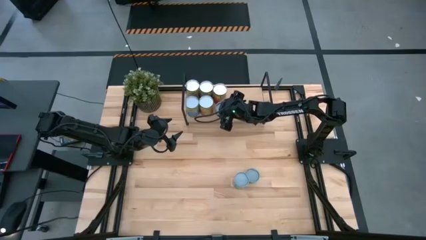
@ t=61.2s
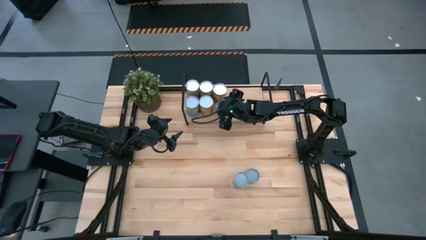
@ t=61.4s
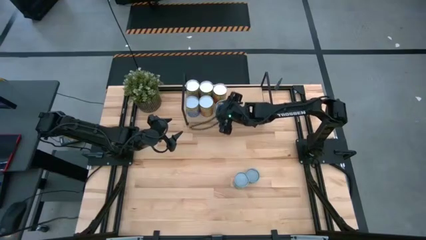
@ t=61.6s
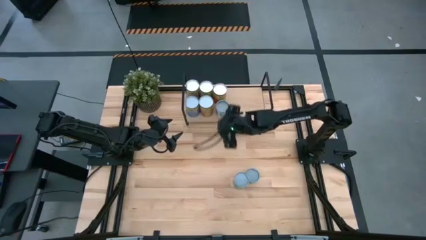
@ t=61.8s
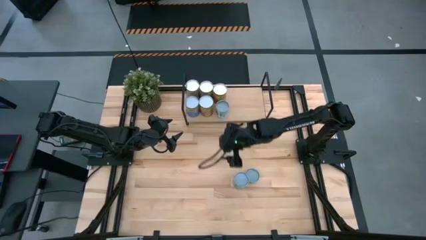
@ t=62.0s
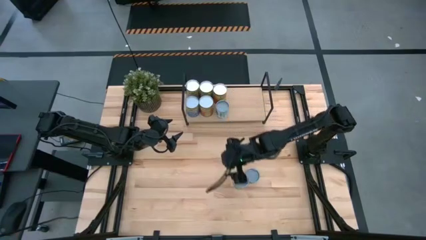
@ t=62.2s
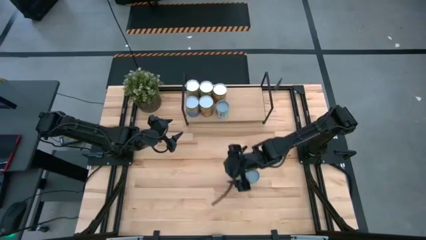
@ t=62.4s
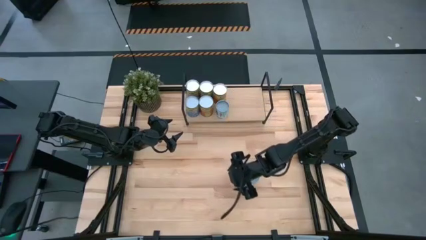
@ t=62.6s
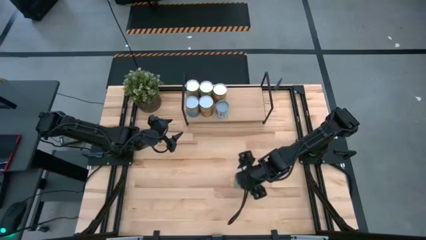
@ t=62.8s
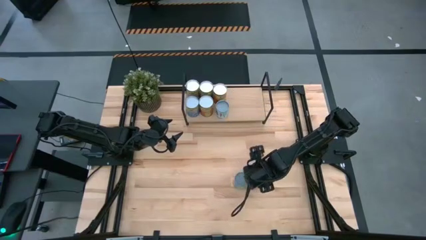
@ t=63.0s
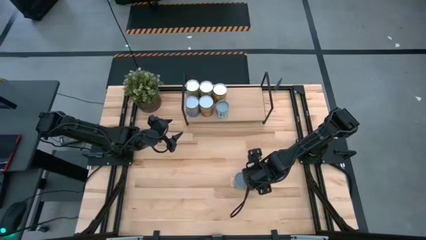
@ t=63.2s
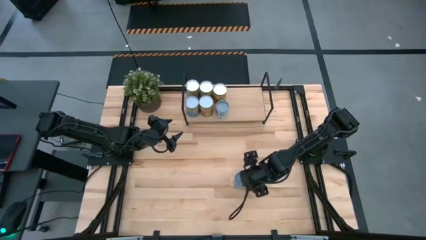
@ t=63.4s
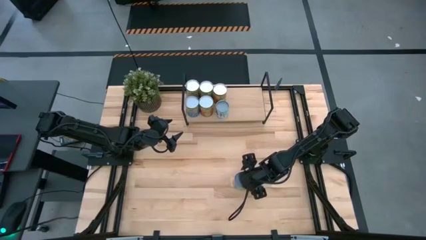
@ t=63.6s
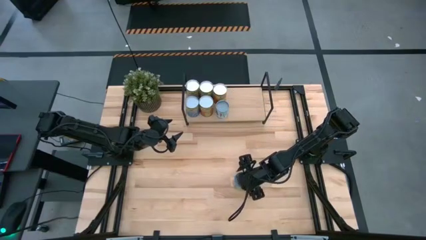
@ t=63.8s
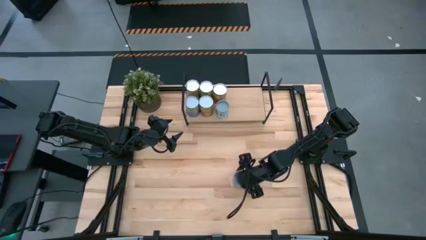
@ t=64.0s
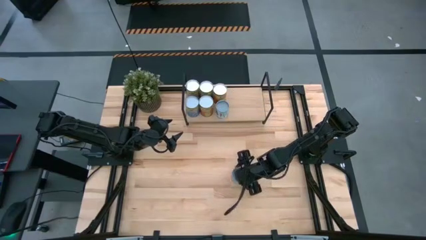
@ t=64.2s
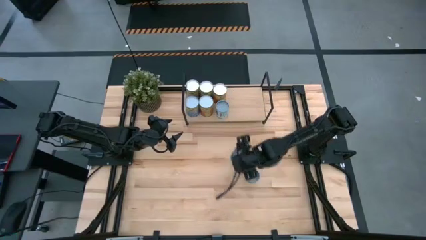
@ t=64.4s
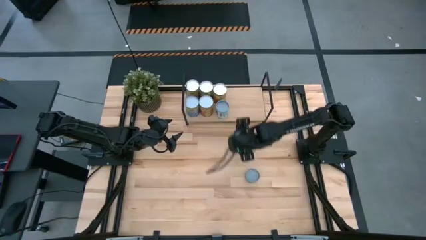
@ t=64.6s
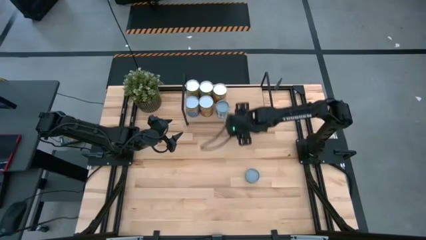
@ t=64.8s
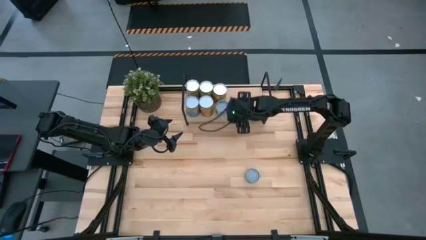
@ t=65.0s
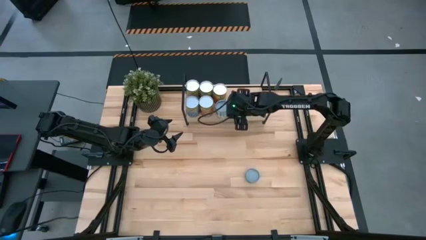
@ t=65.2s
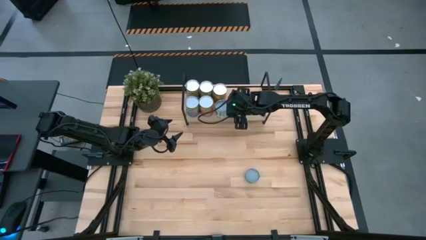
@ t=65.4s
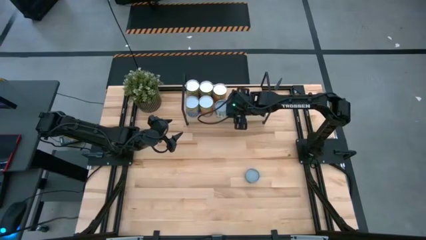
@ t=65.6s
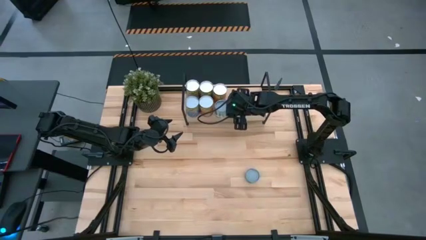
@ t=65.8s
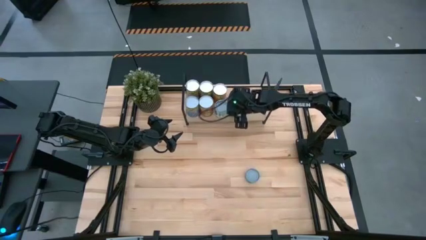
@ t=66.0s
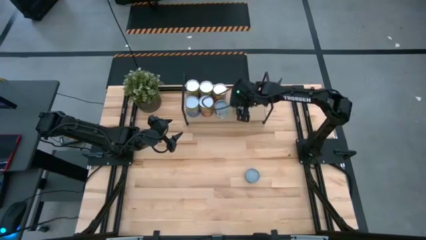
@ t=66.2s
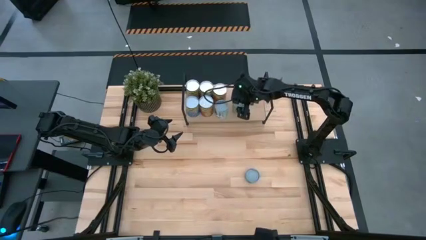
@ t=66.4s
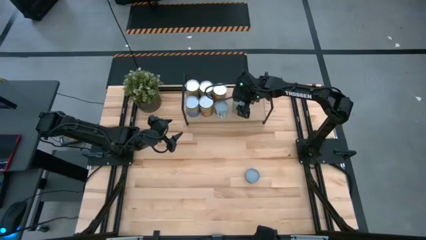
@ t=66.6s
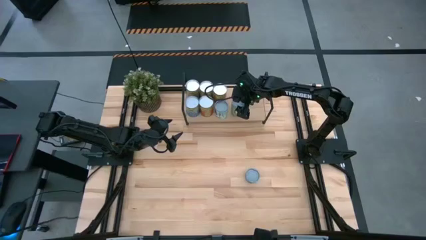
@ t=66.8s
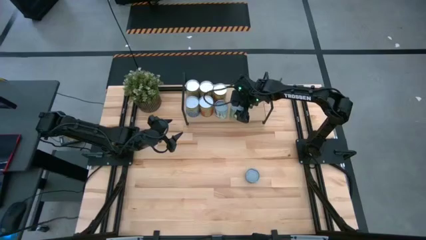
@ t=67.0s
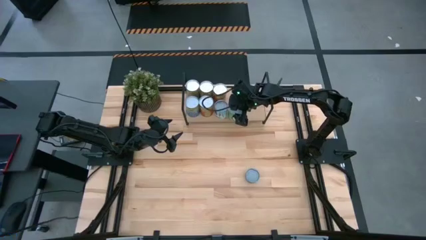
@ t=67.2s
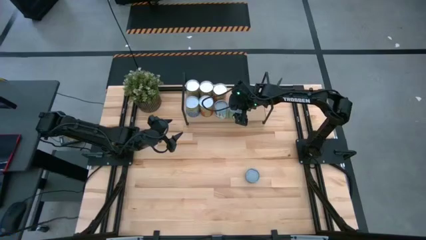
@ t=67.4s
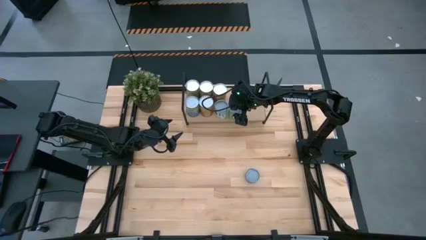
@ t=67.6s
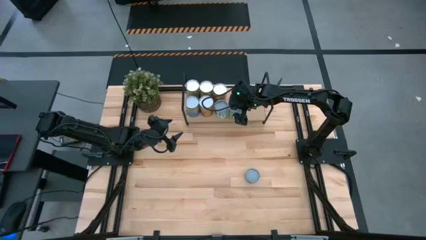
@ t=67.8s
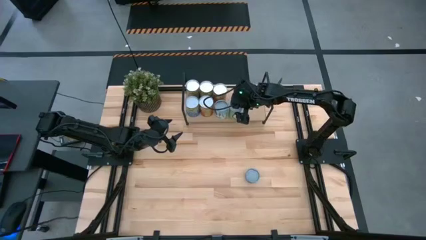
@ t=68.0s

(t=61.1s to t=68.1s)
Task: Pick and place cans onto a shelf
Put the light green can on the shelf

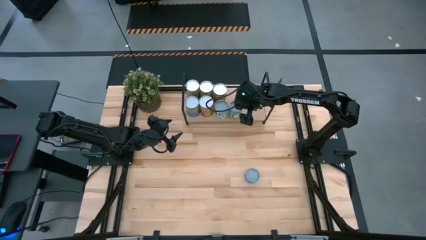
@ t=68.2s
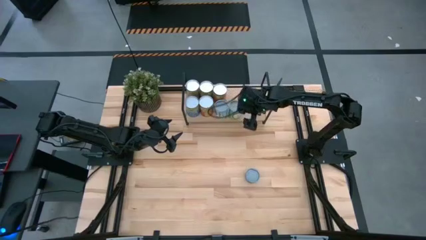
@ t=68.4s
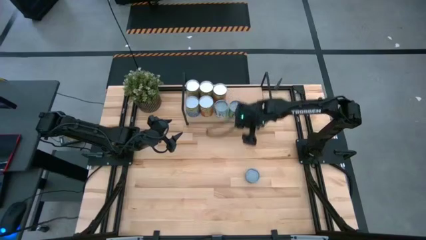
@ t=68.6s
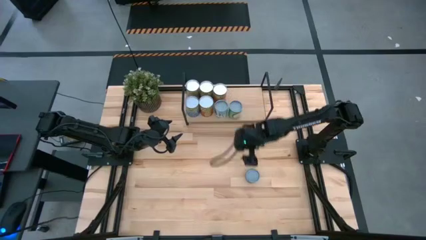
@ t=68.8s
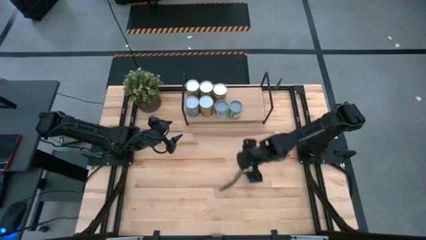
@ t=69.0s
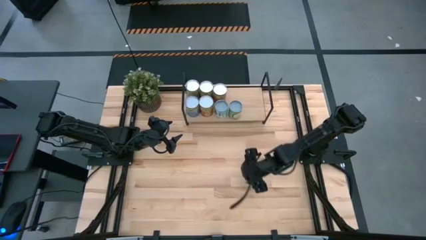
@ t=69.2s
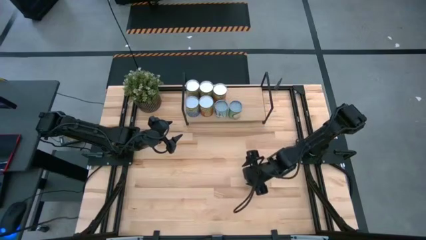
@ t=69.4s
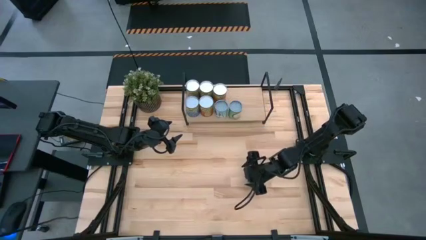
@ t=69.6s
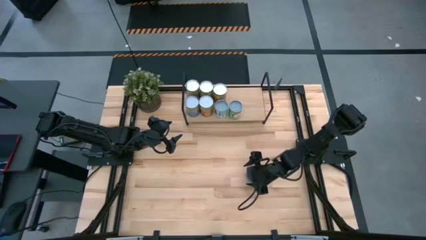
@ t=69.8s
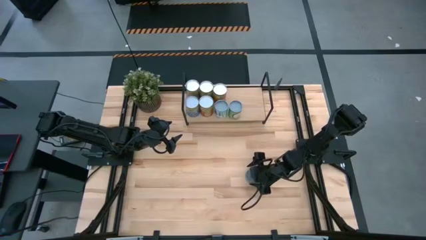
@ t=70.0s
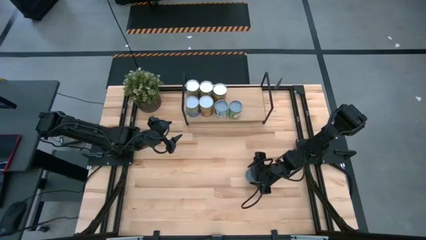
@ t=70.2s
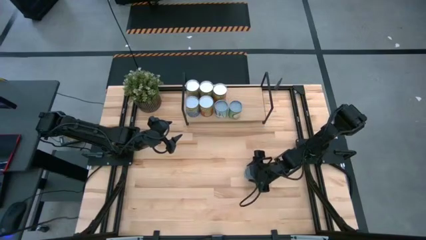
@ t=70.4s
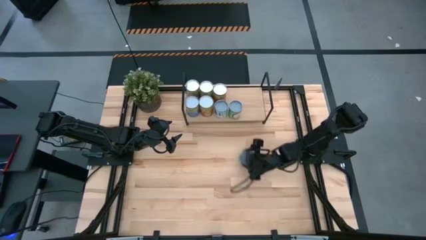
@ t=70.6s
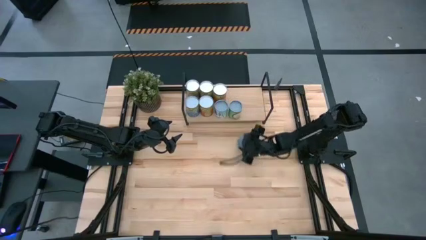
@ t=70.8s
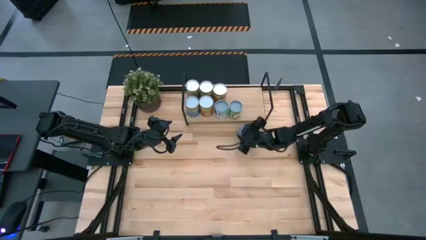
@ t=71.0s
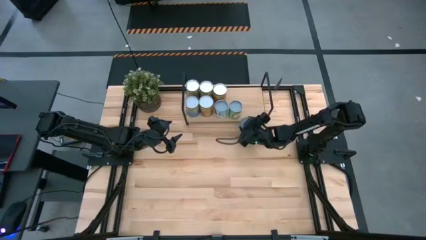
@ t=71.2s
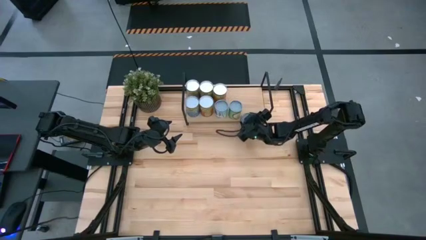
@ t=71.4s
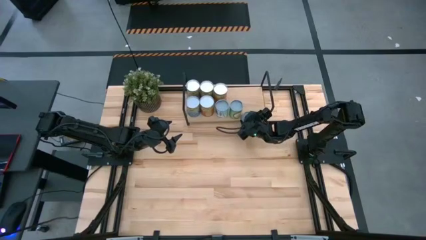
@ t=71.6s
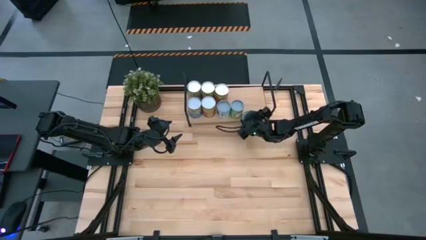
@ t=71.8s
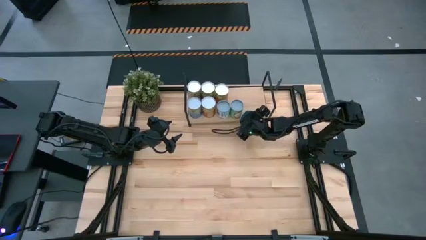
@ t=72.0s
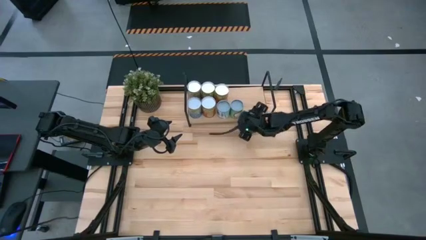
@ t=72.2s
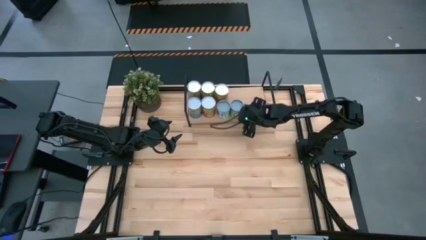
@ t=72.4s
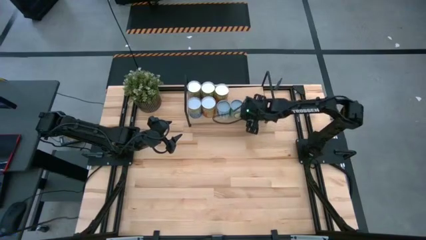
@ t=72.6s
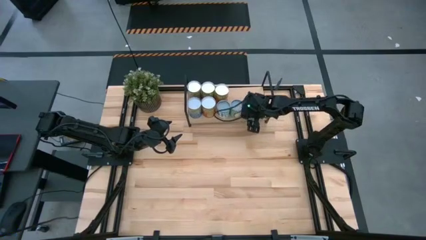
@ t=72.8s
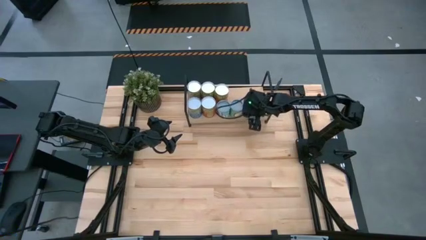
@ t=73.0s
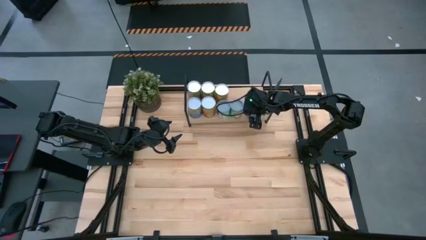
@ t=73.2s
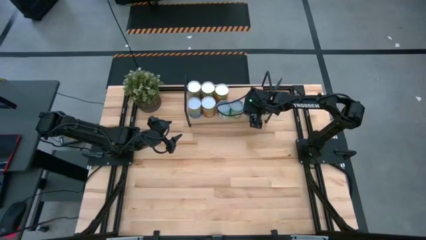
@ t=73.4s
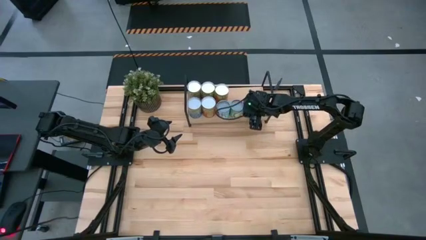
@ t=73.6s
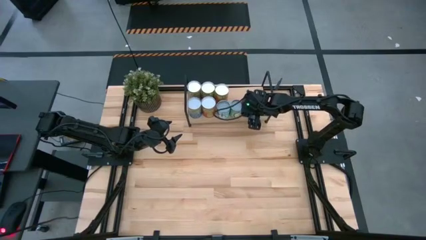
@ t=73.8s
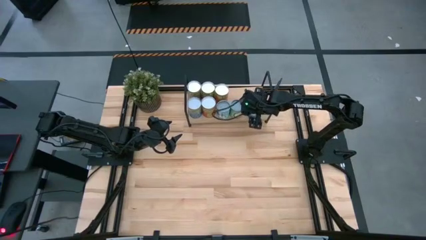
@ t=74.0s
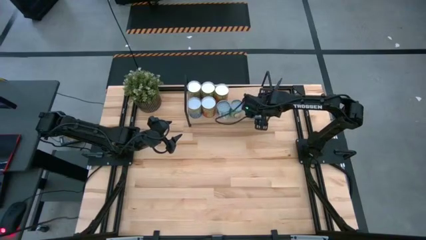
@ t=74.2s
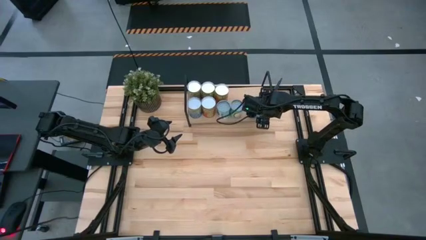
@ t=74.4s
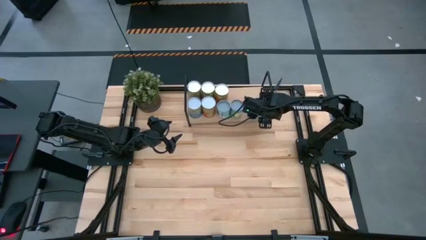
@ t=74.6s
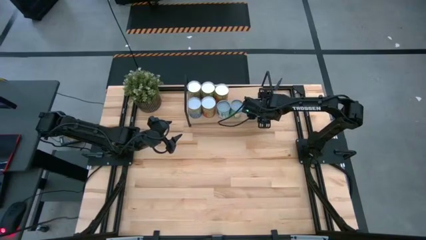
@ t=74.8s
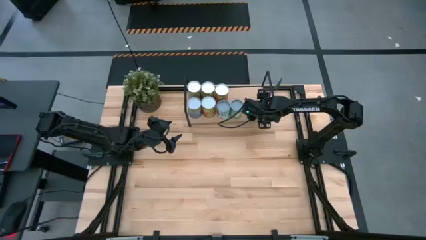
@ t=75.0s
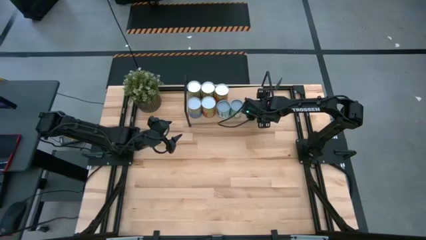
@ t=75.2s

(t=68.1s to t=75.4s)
Put the dark green can on the shelf
